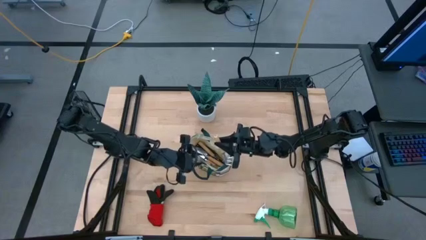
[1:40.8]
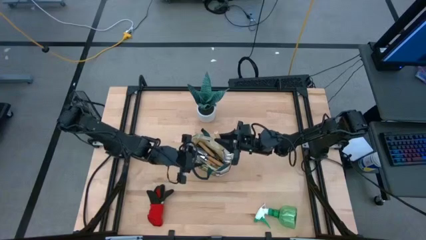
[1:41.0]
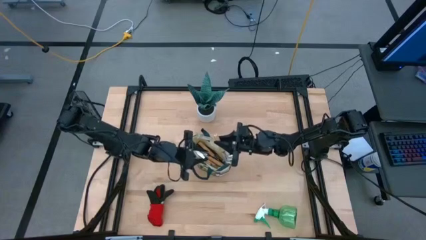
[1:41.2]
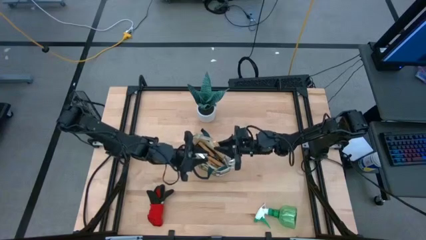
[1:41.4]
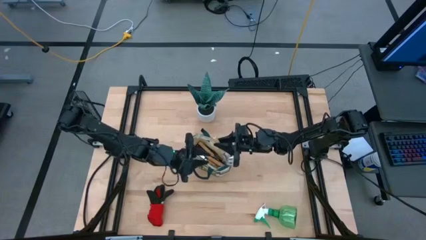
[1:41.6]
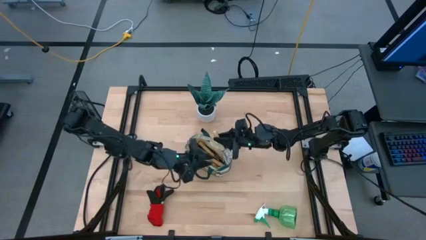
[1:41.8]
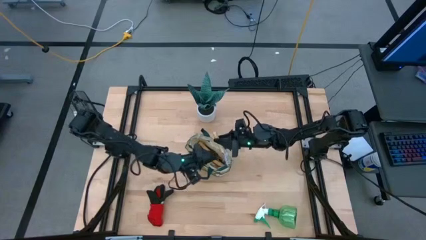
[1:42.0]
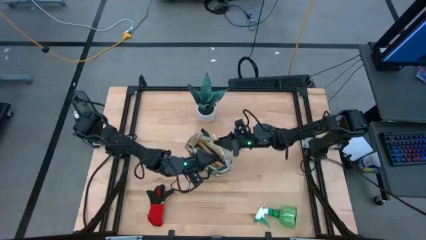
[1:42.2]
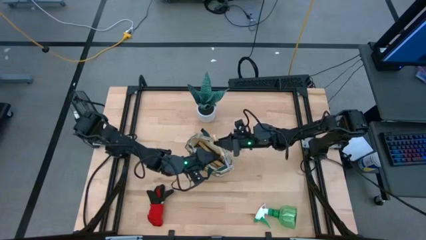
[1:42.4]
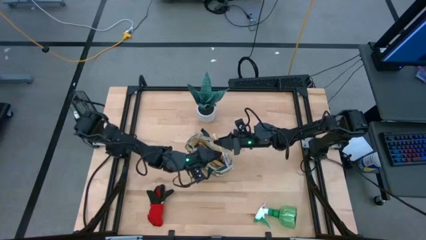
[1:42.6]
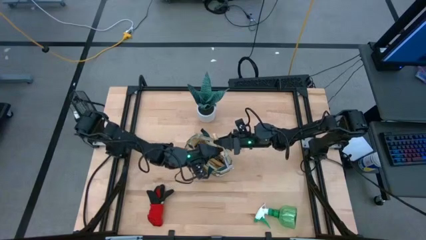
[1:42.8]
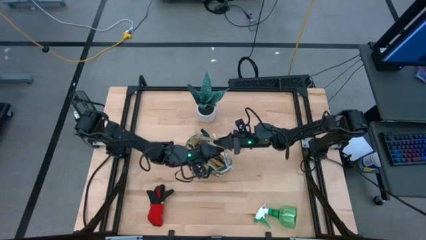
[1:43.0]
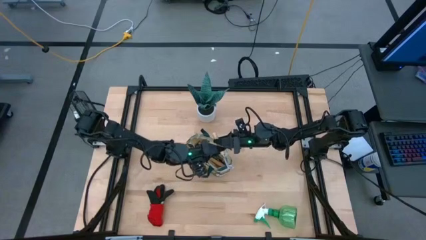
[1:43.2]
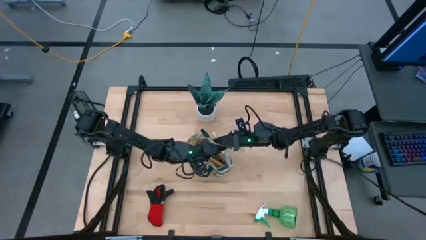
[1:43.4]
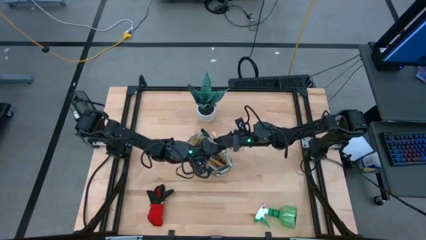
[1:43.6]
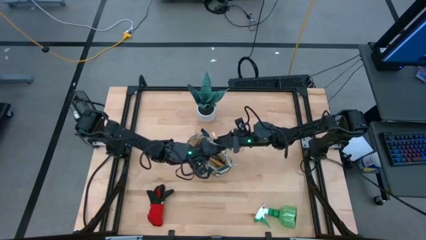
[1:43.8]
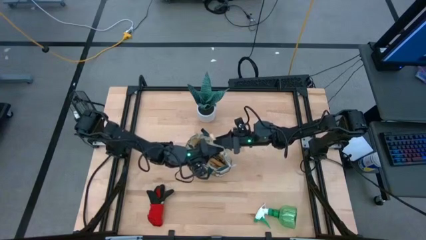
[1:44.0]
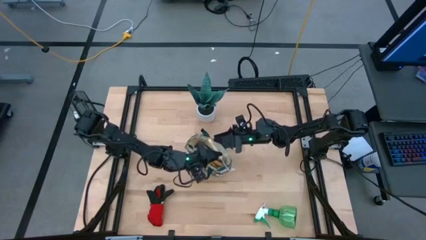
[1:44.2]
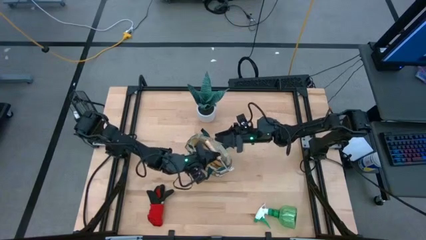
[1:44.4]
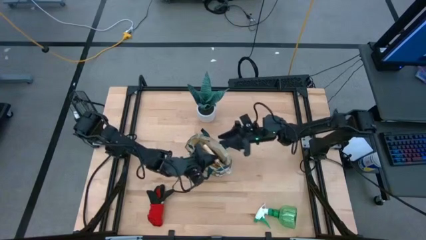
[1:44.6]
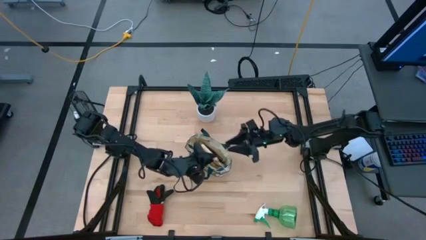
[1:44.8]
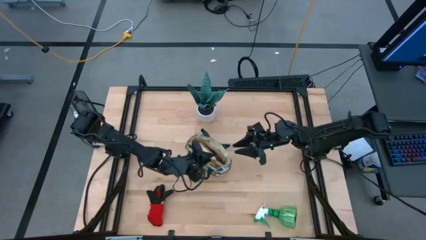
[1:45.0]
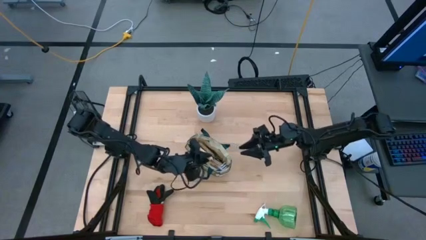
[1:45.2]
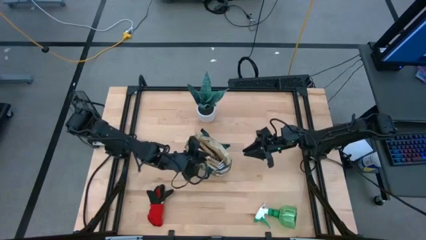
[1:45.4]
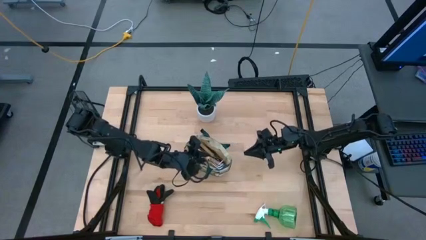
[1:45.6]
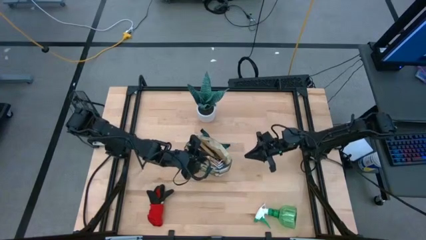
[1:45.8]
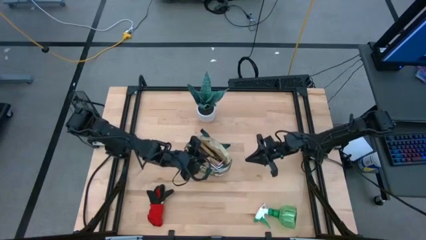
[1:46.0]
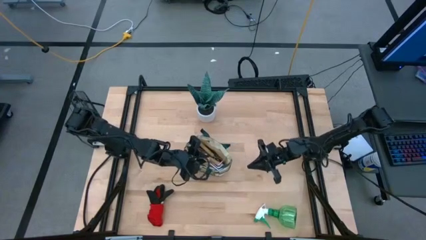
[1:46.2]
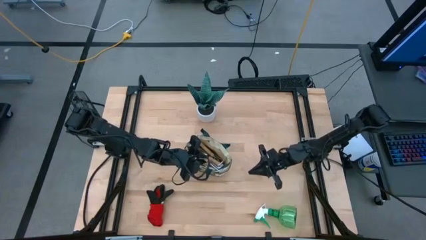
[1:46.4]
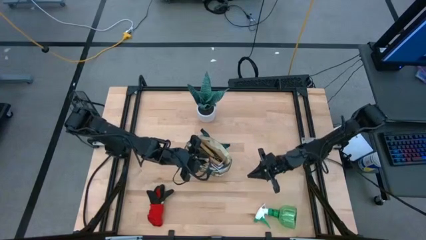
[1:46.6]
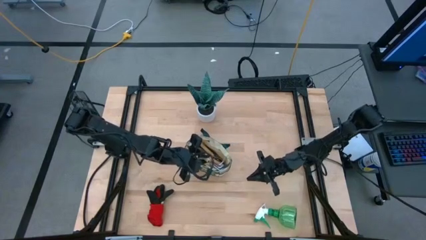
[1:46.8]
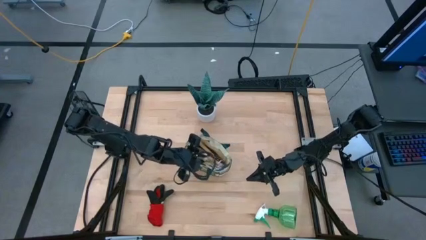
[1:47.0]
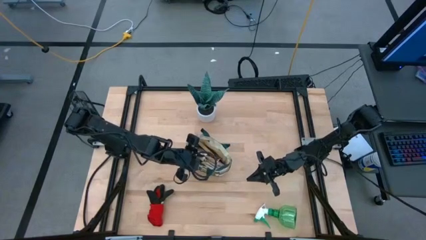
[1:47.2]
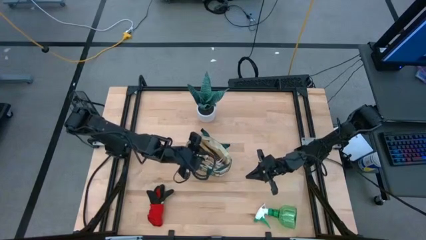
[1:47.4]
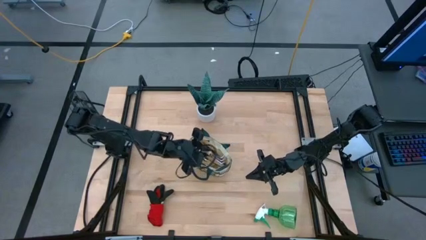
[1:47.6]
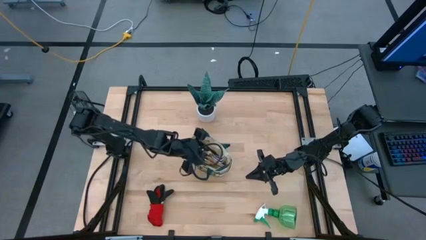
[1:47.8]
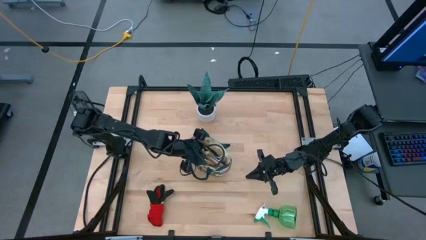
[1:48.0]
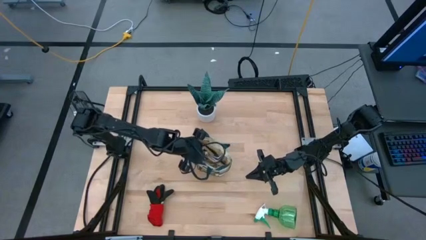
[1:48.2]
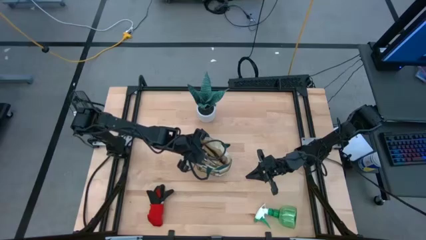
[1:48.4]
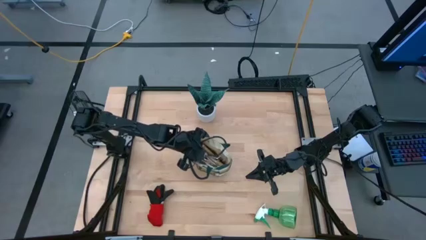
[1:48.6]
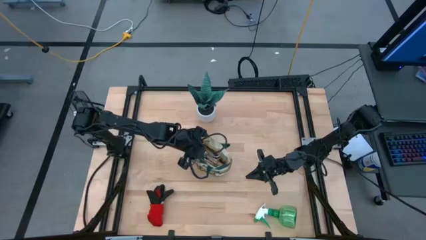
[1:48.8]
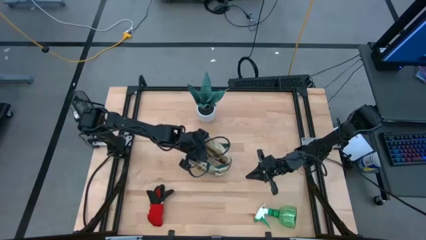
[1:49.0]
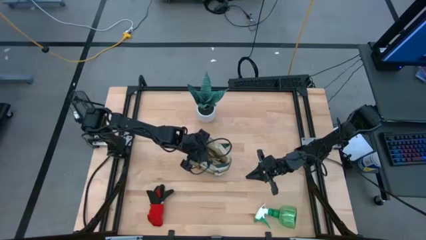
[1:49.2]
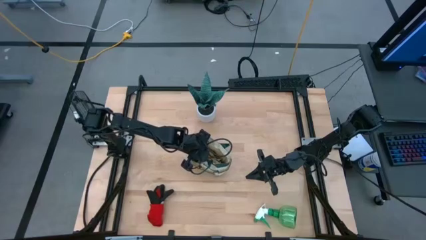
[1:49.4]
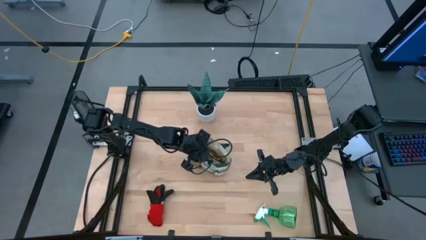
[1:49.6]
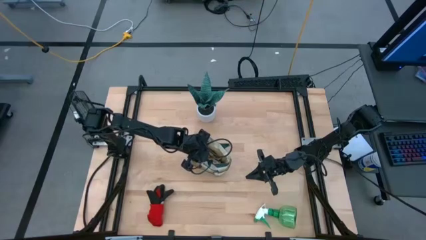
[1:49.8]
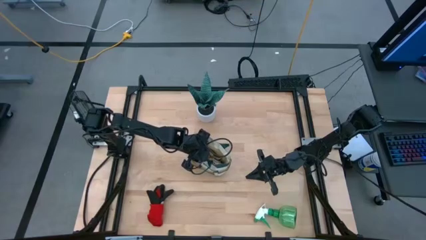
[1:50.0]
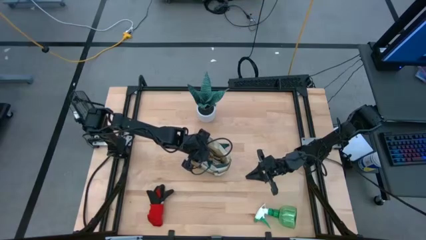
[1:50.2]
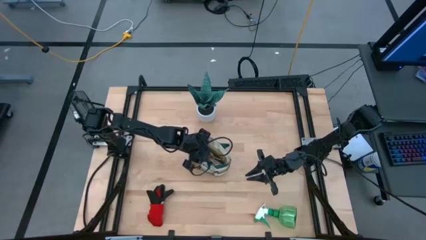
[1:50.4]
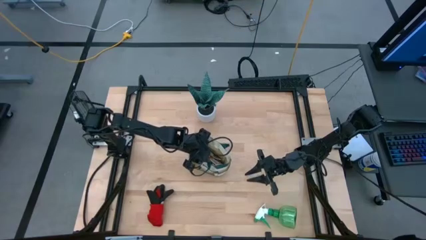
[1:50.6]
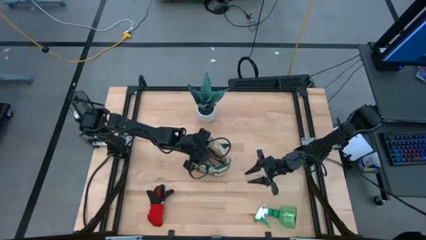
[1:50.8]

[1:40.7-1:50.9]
Task: Pick & Place Garden tools in Gardening bag
Put the hand rake into the gardening bag

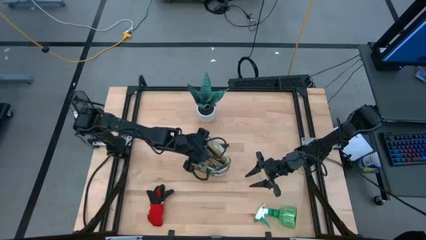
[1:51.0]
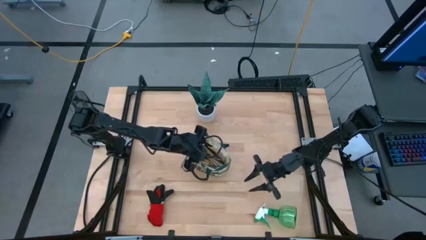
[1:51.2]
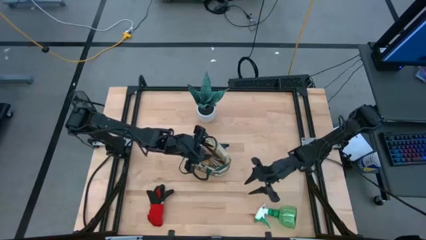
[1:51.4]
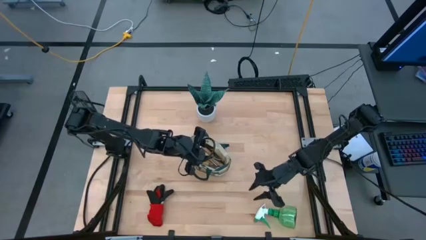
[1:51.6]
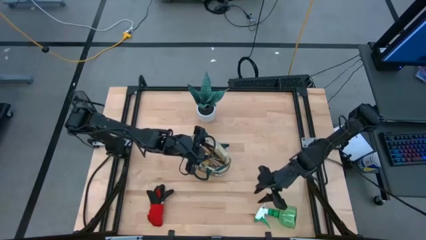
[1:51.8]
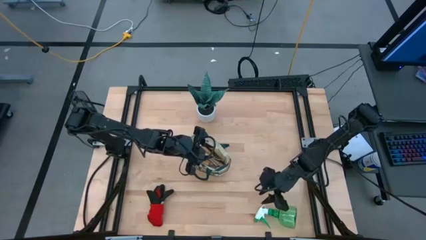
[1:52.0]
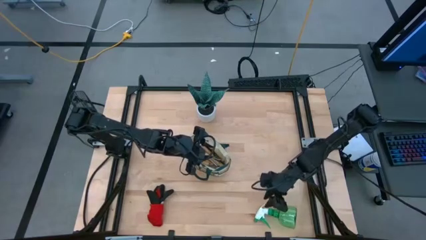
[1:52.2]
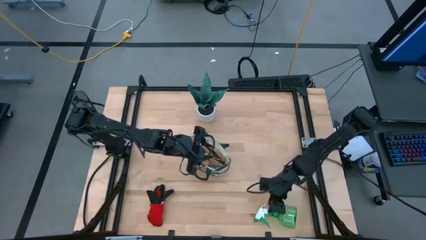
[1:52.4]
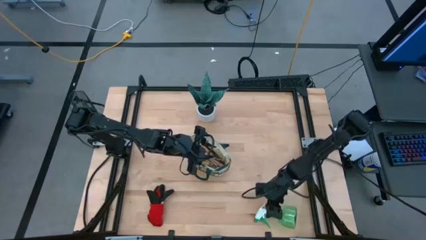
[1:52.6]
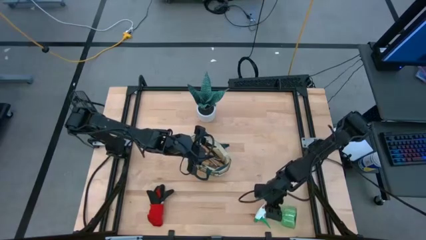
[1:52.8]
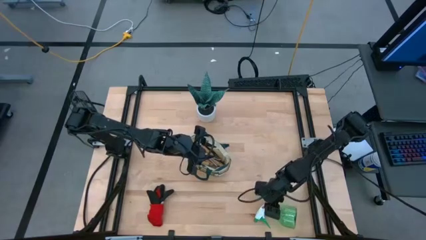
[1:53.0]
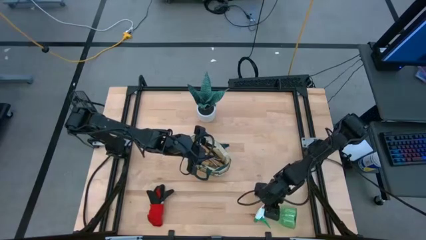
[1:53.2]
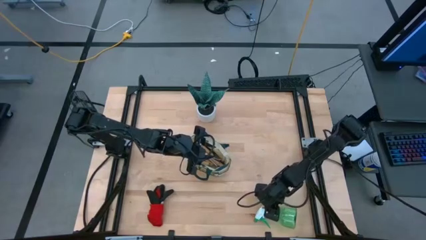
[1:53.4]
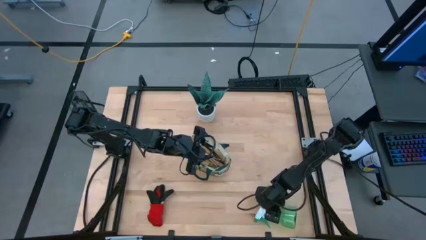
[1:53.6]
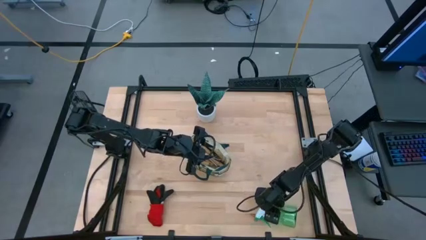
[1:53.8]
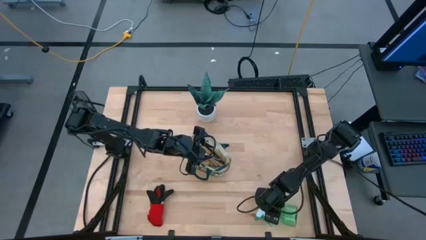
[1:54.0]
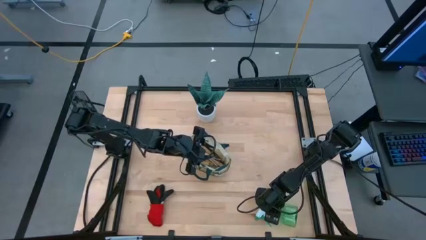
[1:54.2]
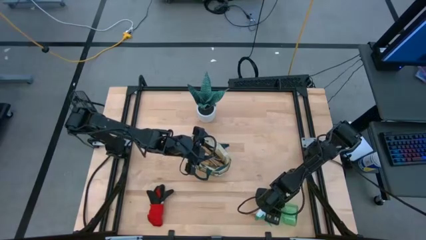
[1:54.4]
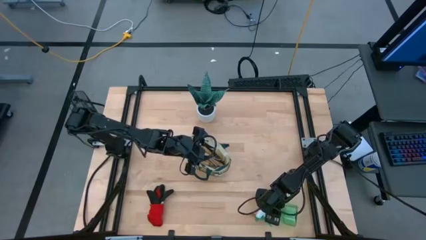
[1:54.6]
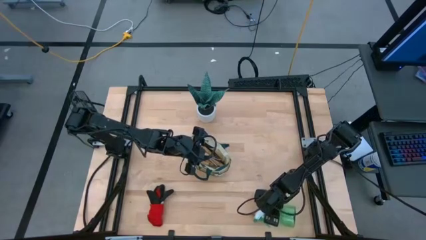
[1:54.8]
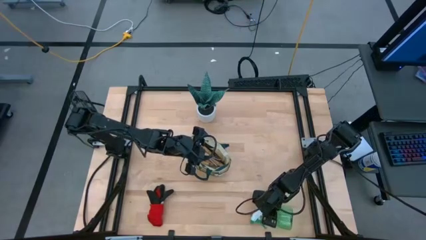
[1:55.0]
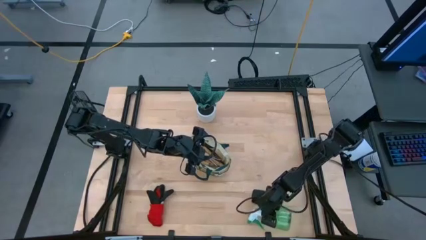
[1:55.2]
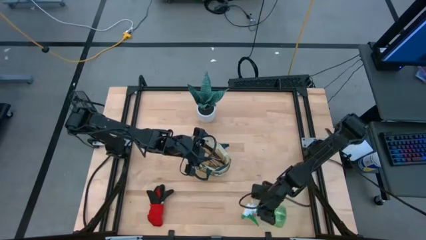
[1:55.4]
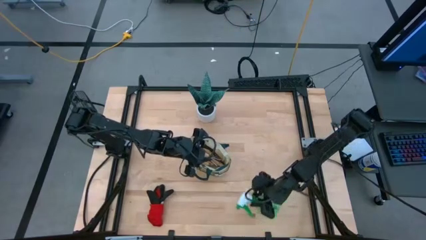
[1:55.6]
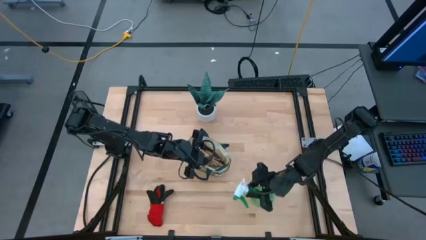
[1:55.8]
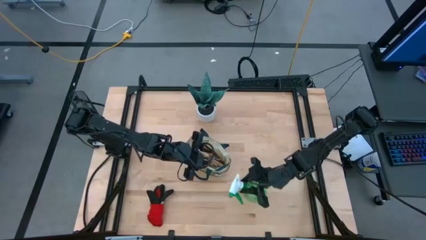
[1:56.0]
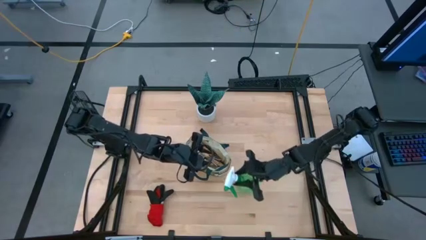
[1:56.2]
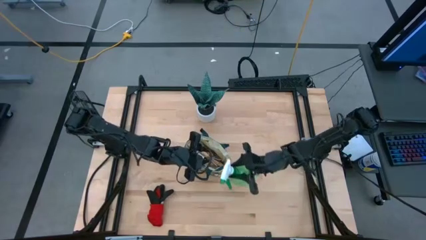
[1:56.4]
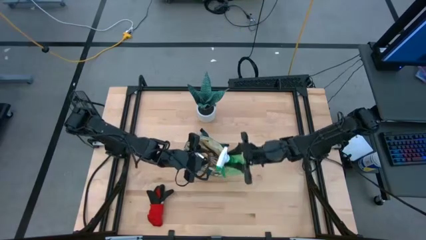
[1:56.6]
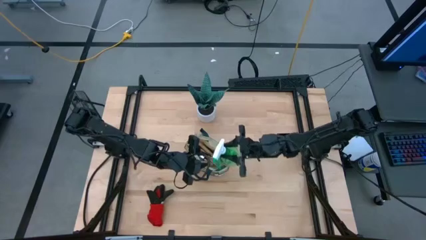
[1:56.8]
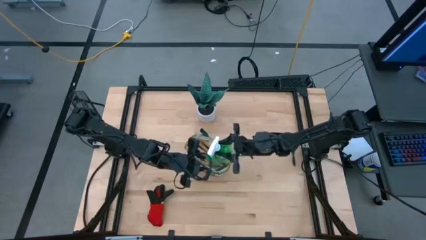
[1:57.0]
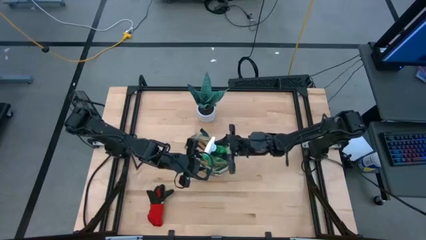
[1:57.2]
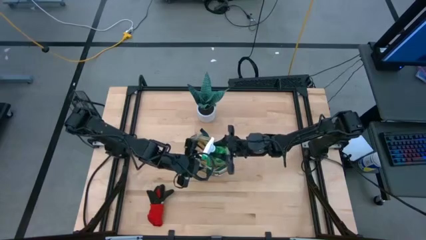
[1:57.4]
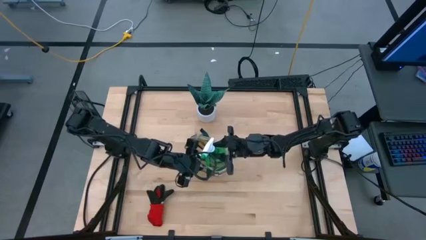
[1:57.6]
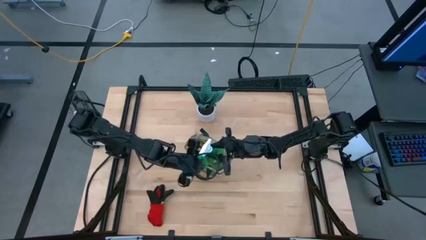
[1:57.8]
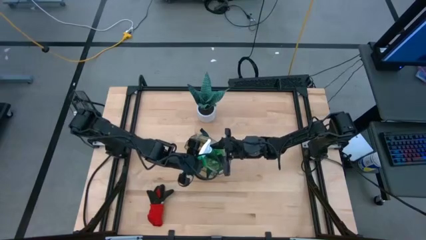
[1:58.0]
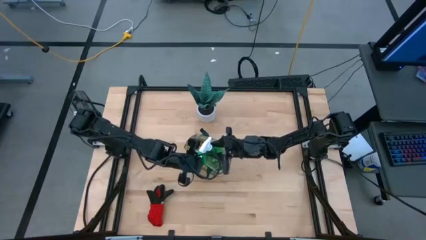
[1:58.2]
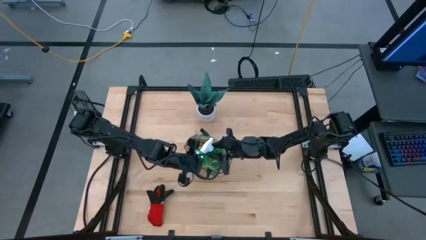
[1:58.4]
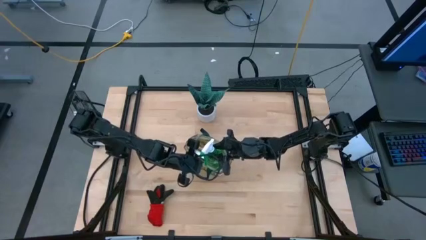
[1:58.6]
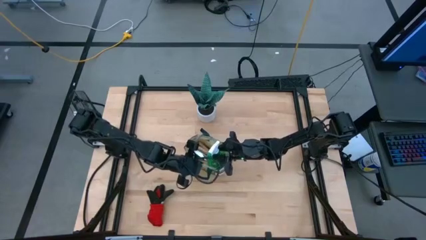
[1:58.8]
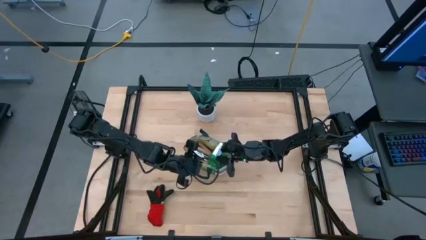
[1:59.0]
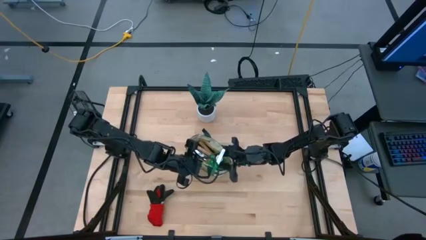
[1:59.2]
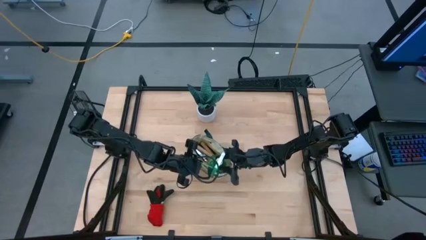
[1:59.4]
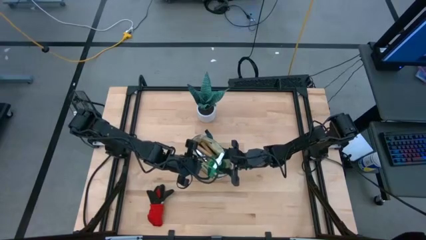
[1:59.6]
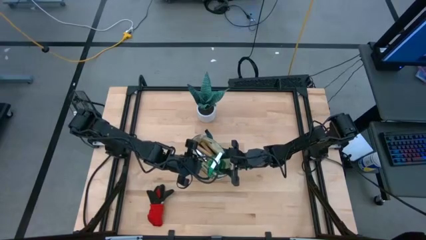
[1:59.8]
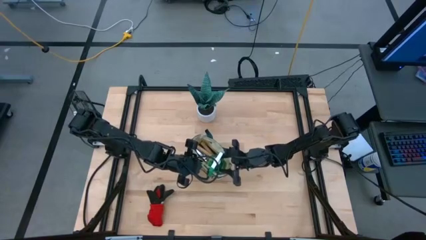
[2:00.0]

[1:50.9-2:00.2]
Put the spray bottle into the gardening bag
